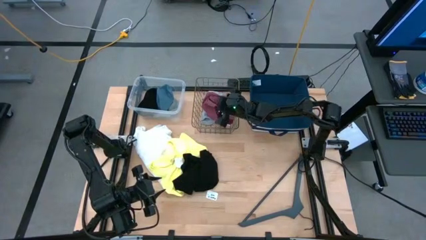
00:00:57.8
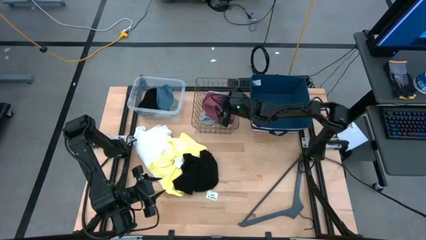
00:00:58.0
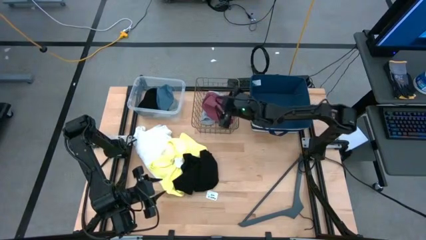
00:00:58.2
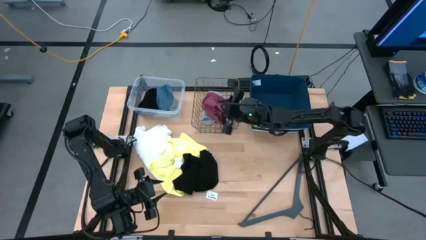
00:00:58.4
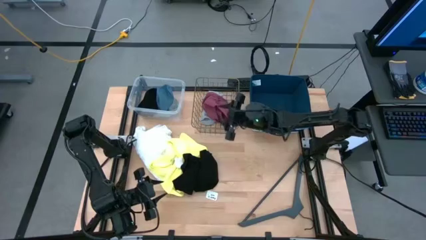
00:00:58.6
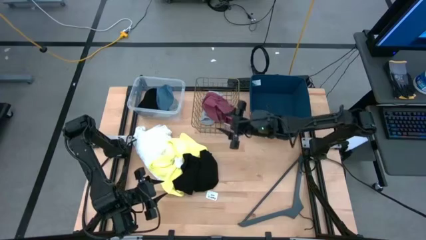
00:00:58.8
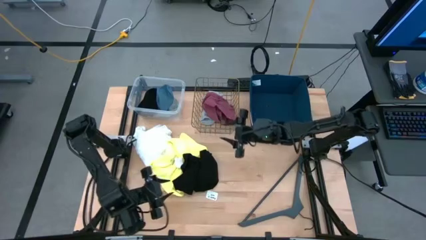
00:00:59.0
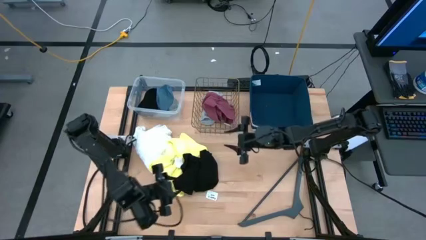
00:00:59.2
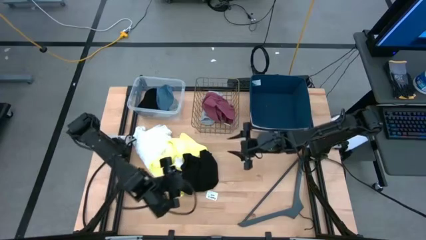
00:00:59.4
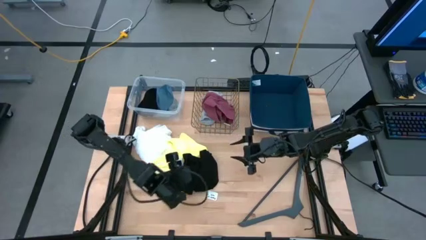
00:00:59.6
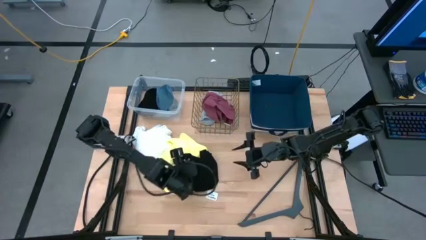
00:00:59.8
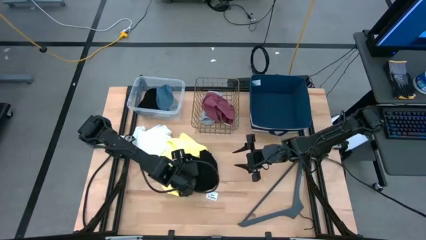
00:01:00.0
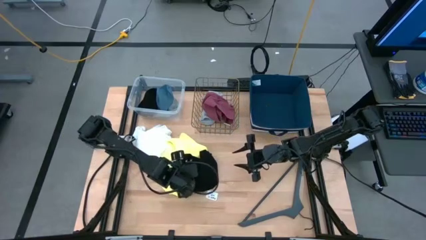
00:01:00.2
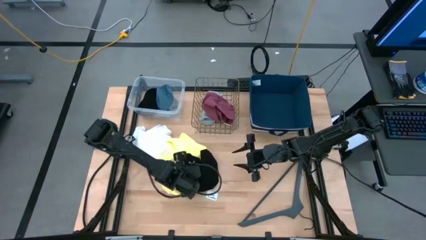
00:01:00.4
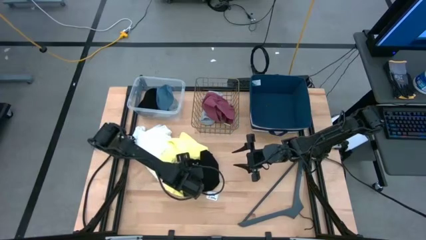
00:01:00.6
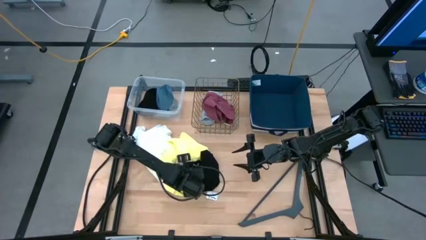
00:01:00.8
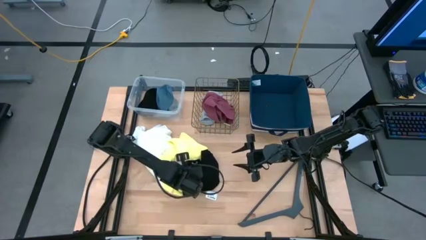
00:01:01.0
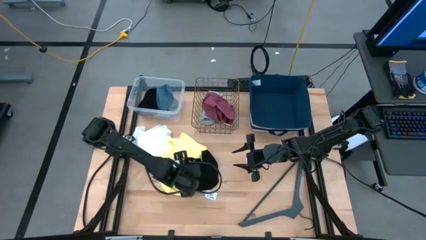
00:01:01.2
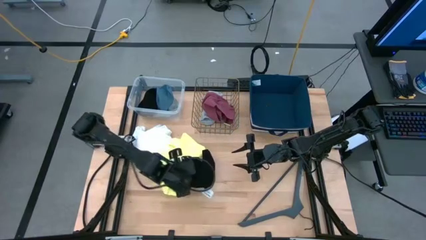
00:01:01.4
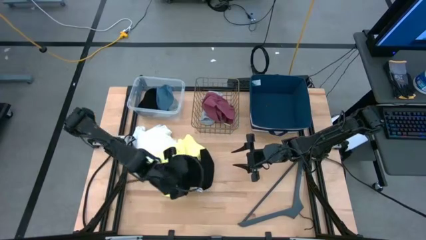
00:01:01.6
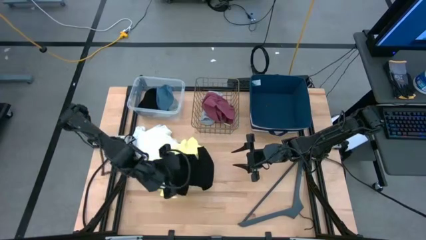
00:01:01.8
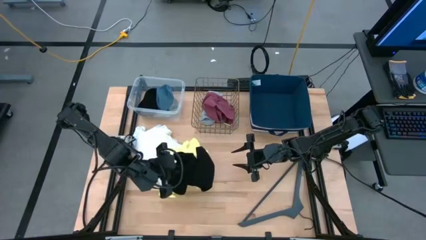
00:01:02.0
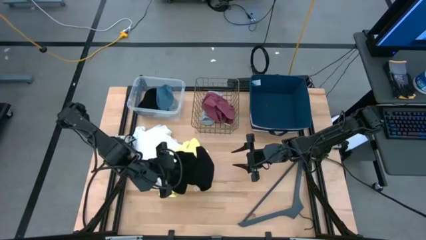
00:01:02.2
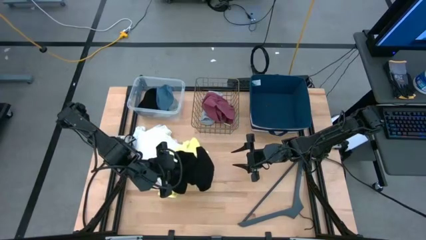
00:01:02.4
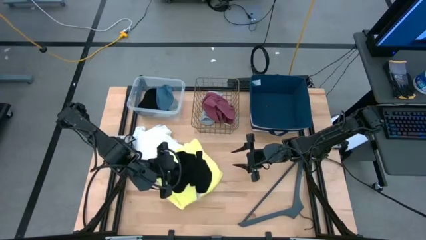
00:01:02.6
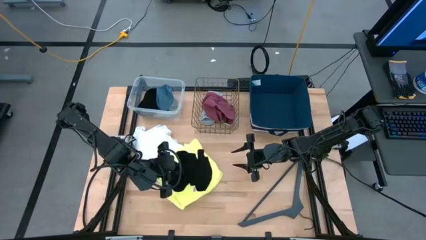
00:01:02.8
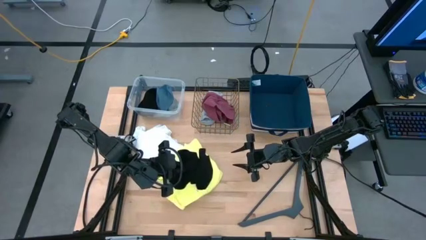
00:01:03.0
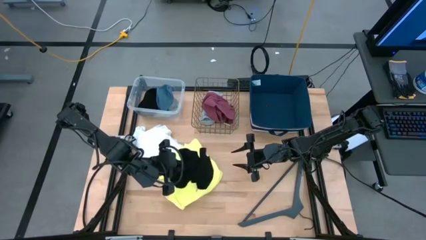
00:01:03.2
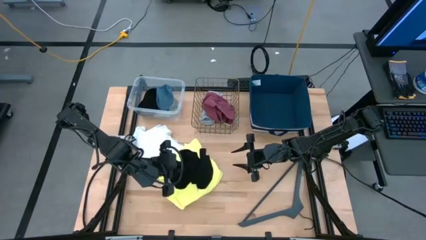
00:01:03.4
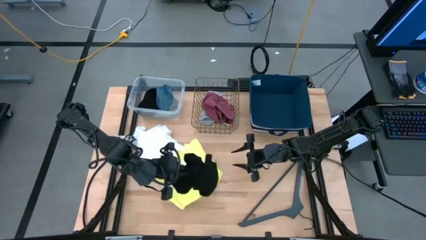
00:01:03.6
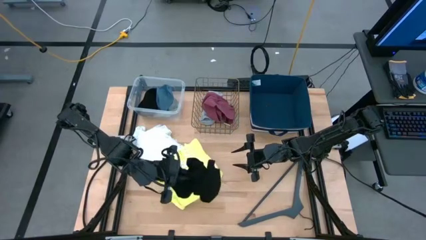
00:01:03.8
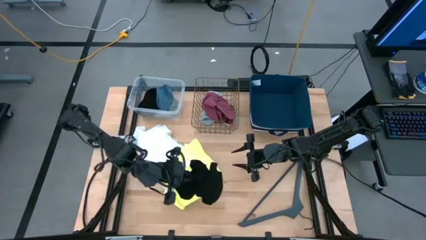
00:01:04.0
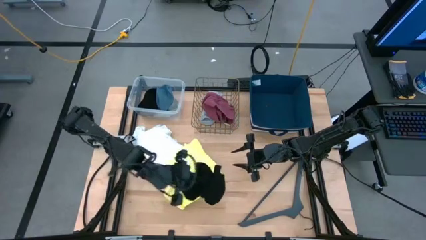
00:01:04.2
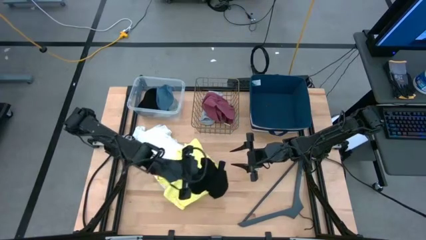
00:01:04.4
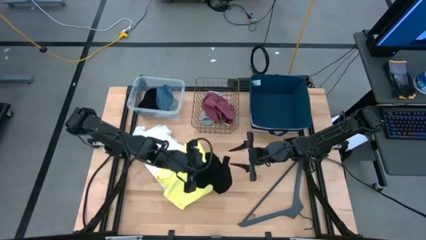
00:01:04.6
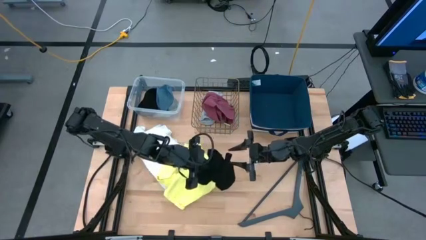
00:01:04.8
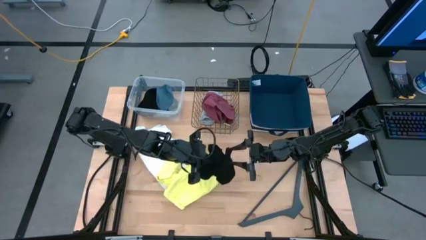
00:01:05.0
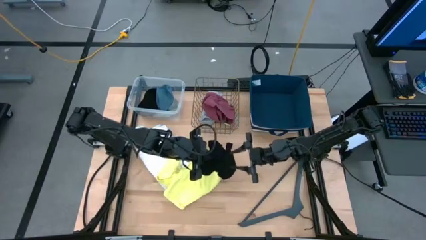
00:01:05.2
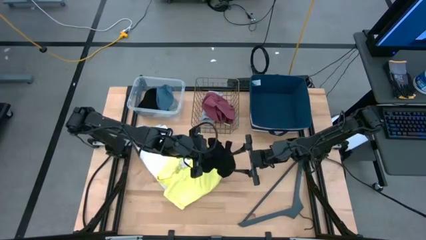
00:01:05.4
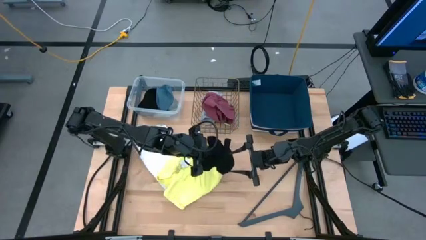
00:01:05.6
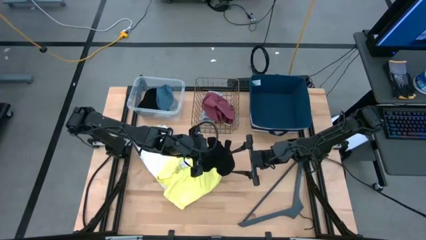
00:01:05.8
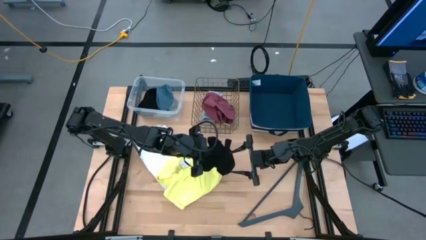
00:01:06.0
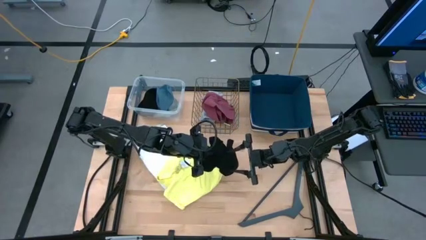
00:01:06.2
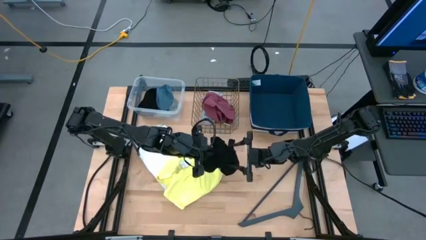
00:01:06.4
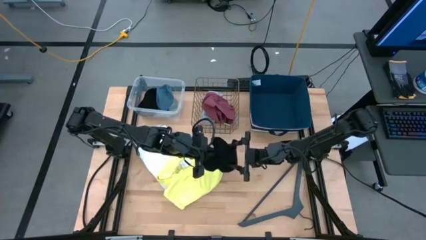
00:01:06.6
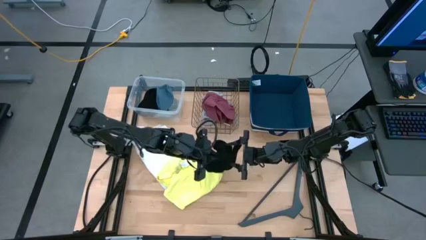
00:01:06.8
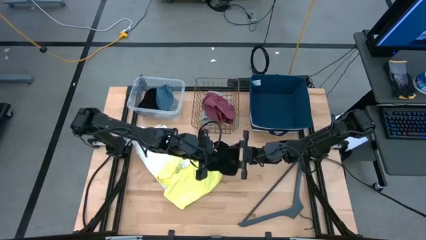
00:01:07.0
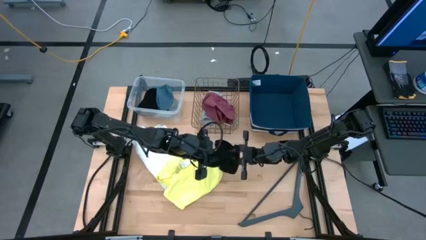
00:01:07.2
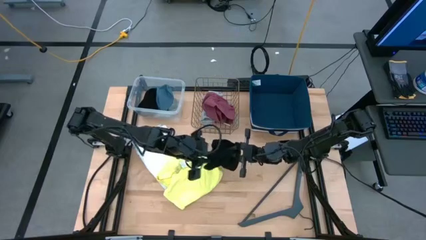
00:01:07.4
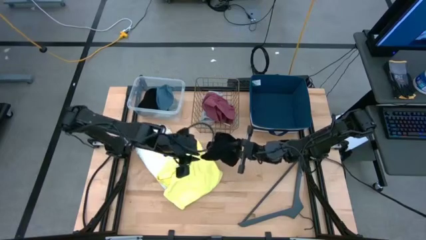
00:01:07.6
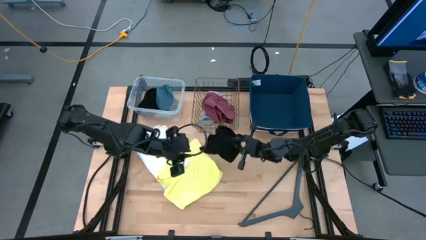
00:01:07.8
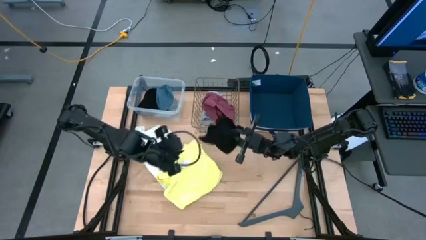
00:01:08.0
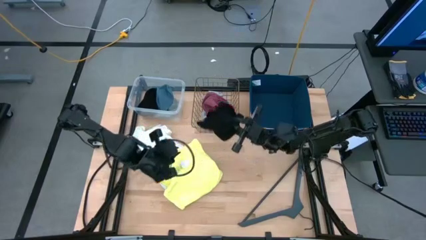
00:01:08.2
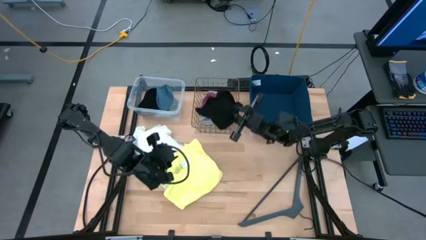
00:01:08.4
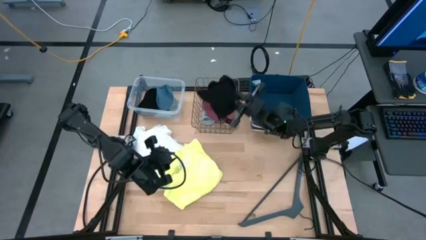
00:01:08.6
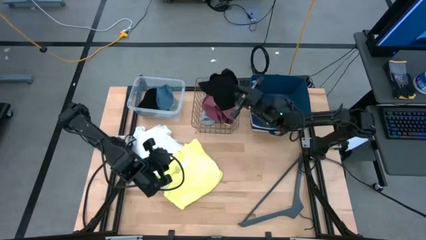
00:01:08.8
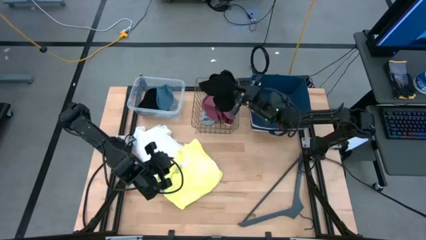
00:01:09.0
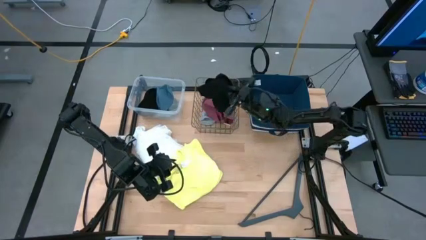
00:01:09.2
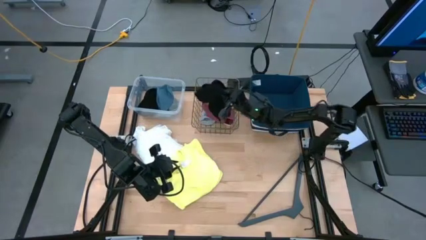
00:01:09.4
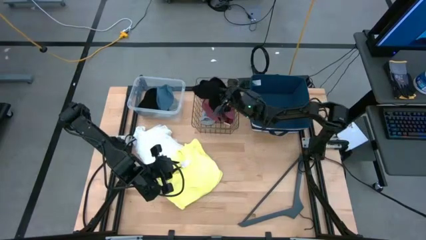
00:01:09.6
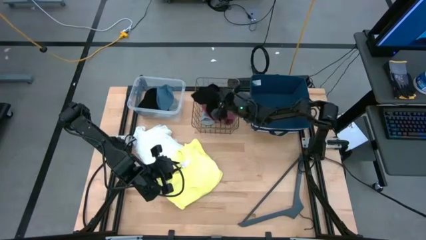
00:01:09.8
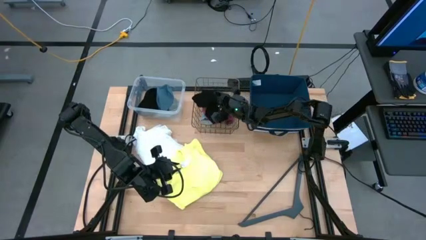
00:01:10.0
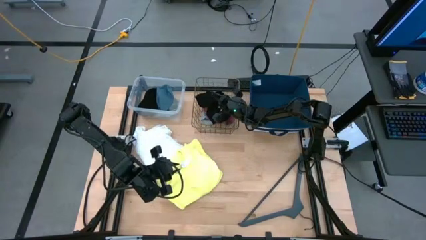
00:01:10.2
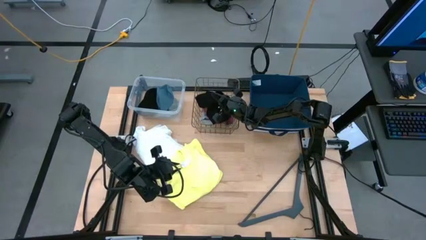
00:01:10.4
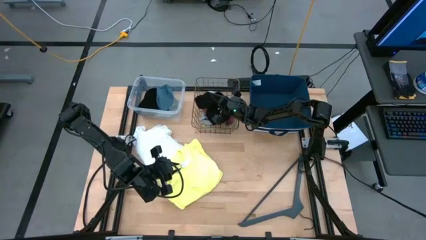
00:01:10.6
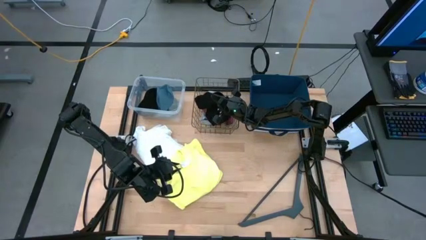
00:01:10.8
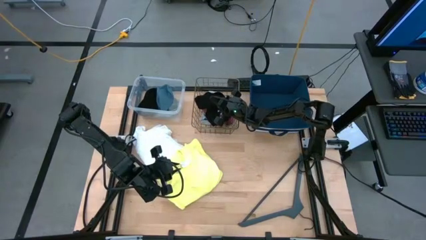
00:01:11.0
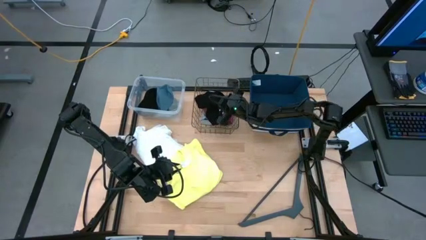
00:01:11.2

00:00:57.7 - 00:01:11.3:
Task: Pick & Place Cloths
Put the black boxer into the gold wire basket
